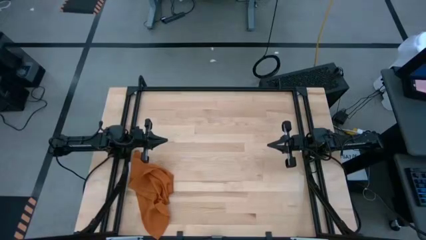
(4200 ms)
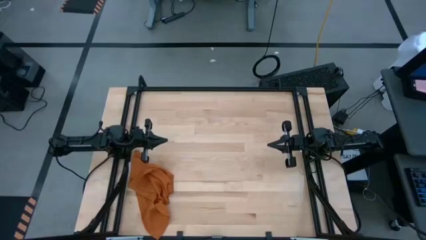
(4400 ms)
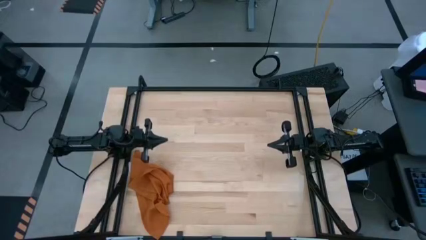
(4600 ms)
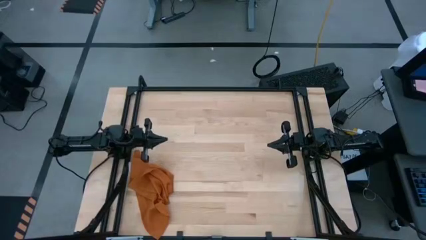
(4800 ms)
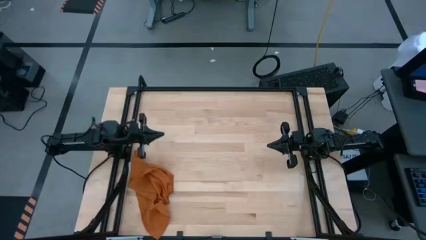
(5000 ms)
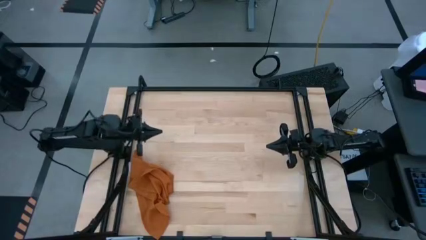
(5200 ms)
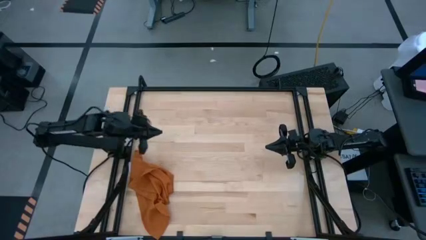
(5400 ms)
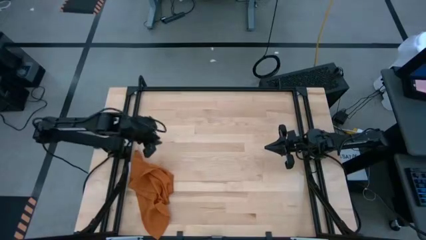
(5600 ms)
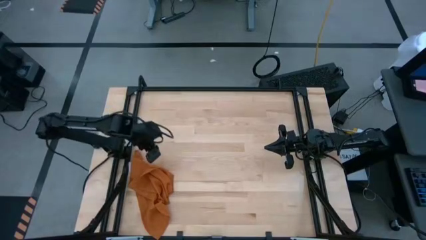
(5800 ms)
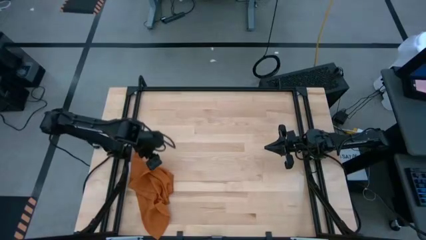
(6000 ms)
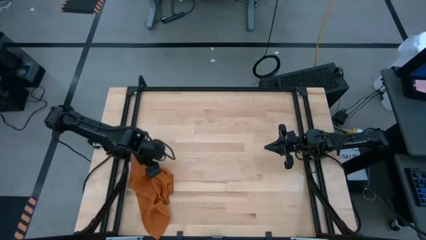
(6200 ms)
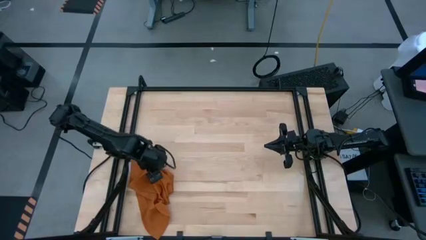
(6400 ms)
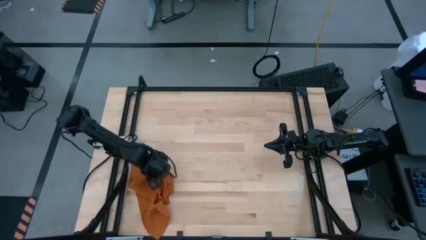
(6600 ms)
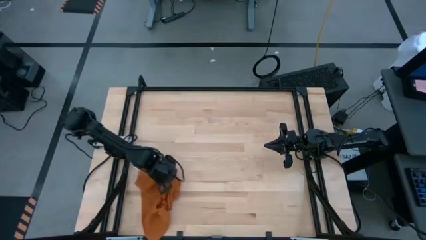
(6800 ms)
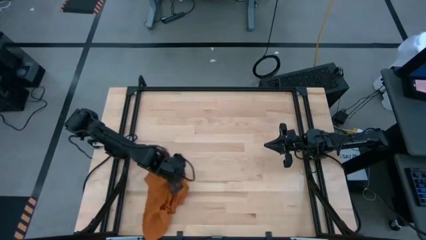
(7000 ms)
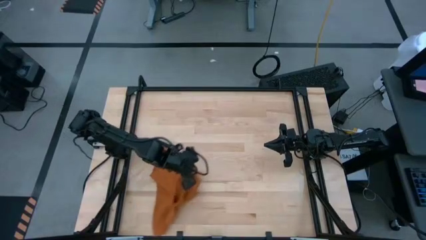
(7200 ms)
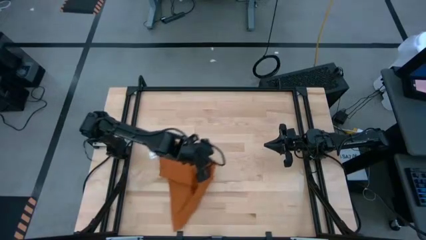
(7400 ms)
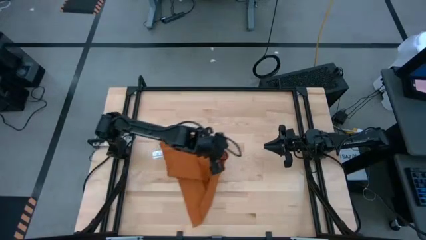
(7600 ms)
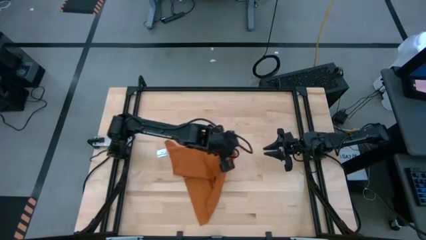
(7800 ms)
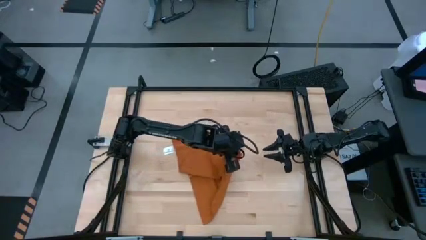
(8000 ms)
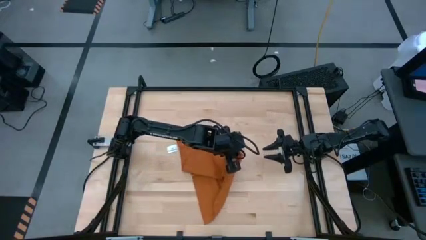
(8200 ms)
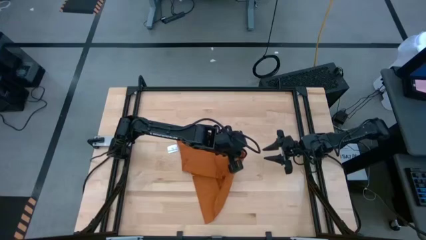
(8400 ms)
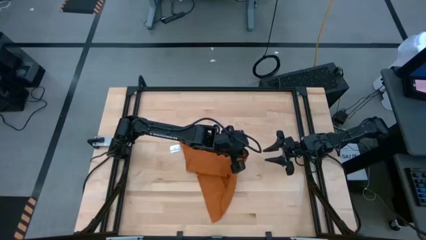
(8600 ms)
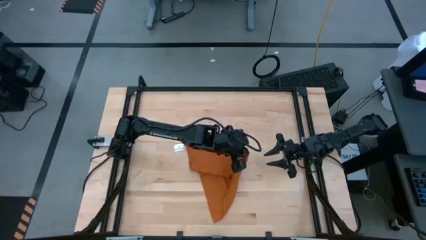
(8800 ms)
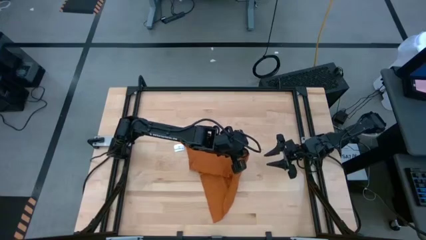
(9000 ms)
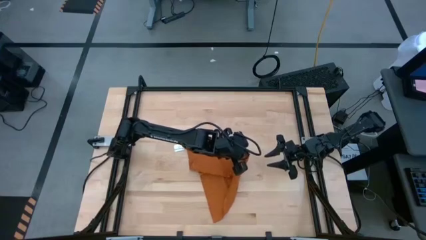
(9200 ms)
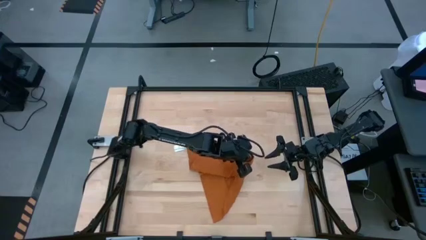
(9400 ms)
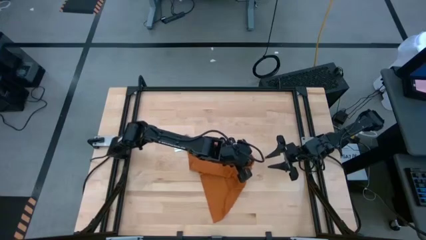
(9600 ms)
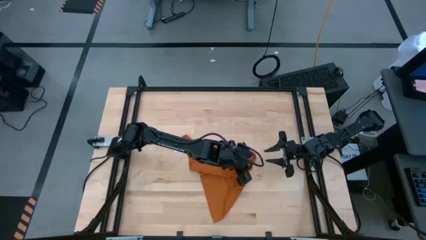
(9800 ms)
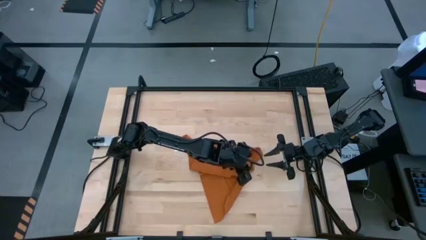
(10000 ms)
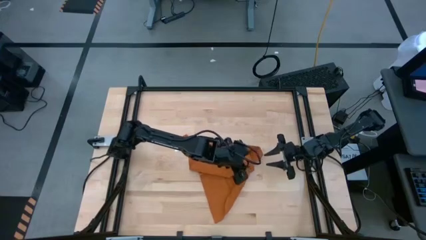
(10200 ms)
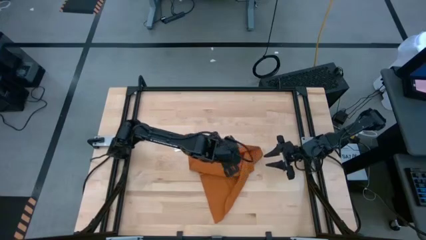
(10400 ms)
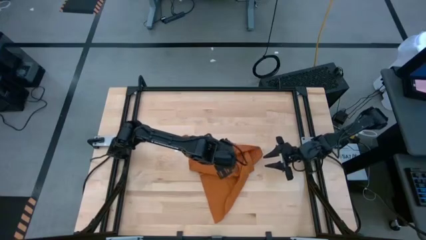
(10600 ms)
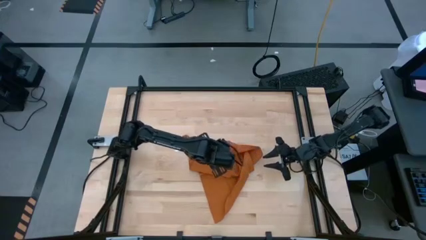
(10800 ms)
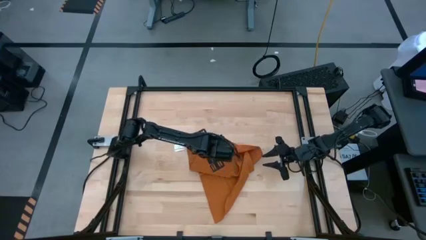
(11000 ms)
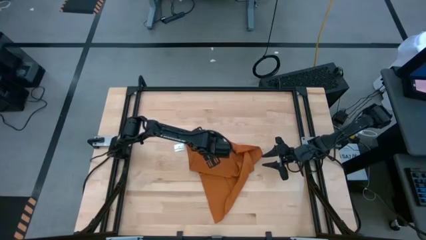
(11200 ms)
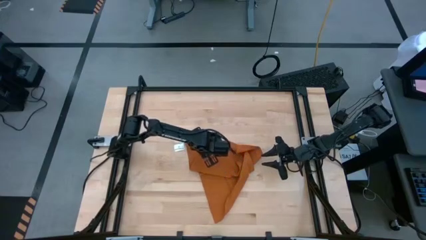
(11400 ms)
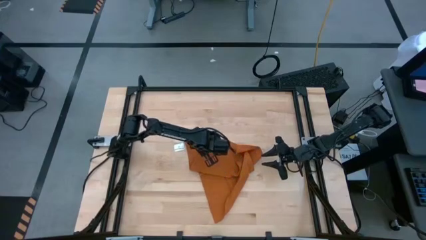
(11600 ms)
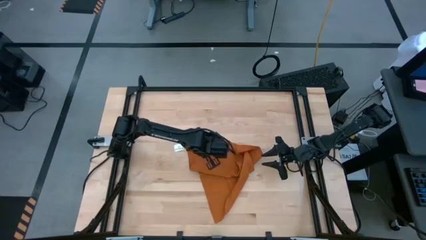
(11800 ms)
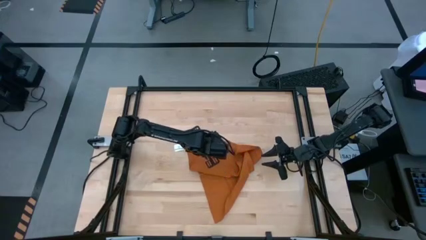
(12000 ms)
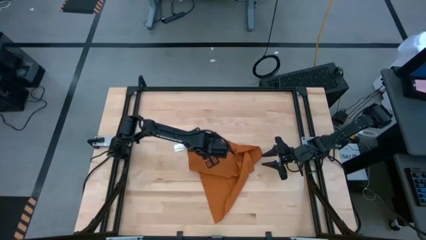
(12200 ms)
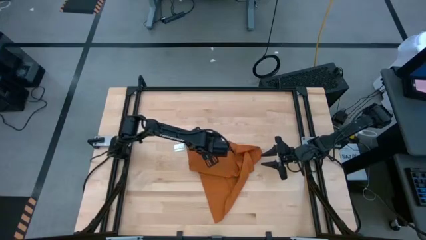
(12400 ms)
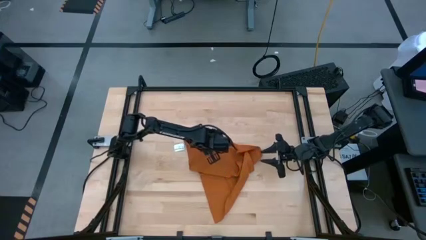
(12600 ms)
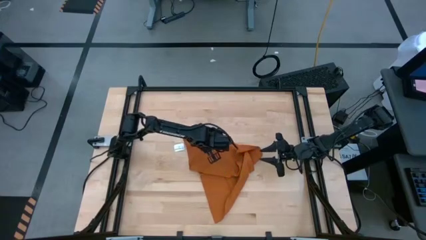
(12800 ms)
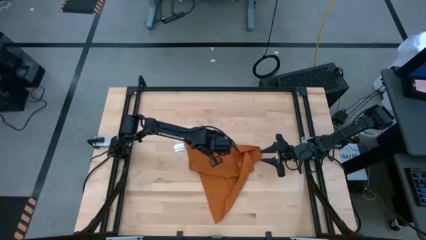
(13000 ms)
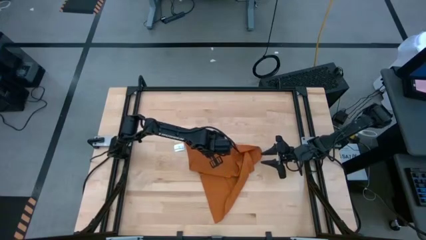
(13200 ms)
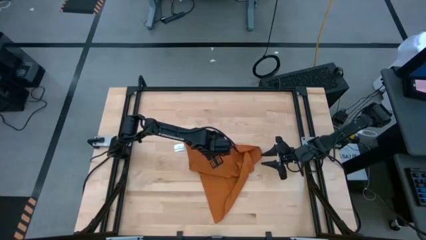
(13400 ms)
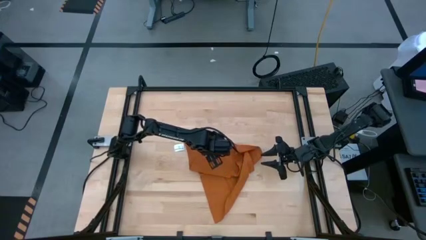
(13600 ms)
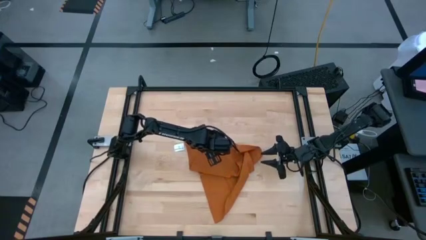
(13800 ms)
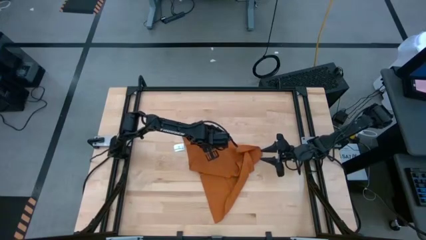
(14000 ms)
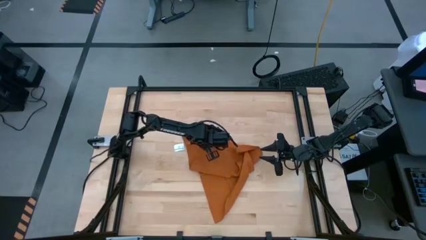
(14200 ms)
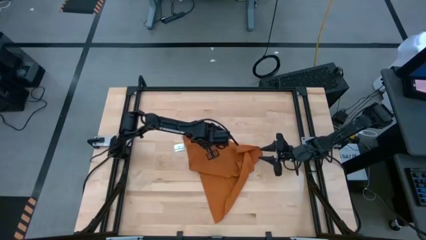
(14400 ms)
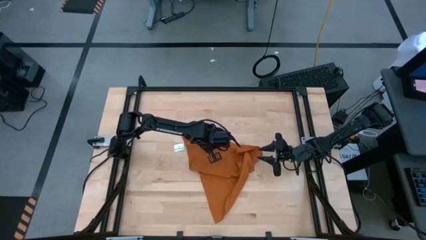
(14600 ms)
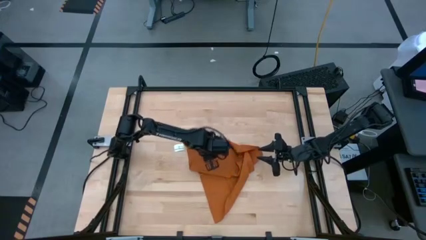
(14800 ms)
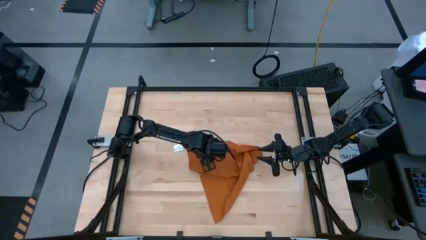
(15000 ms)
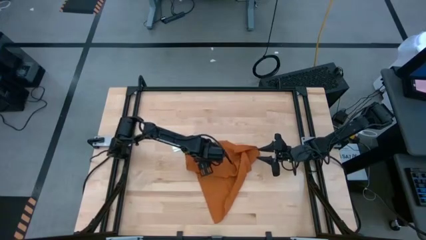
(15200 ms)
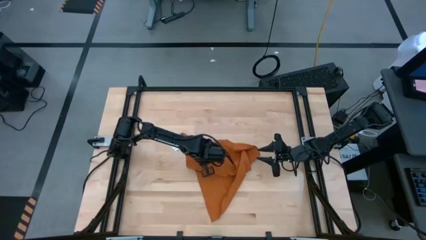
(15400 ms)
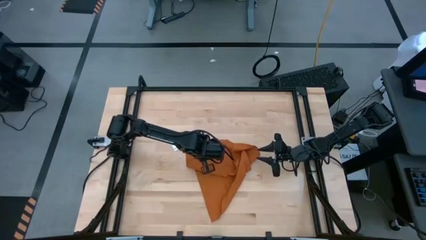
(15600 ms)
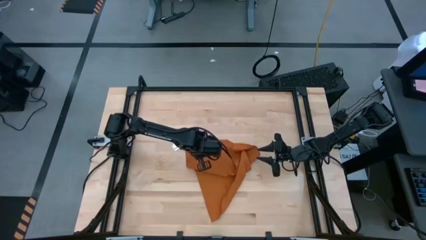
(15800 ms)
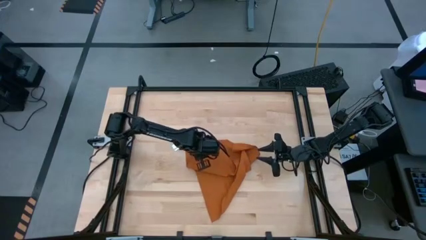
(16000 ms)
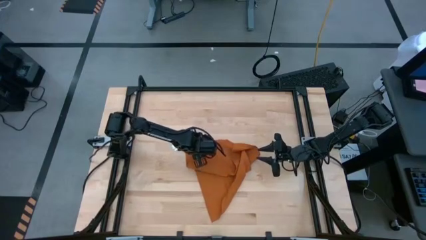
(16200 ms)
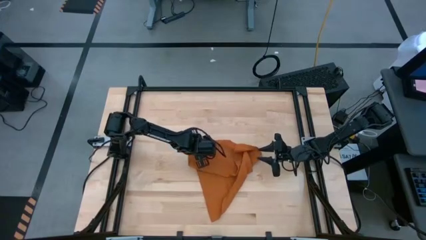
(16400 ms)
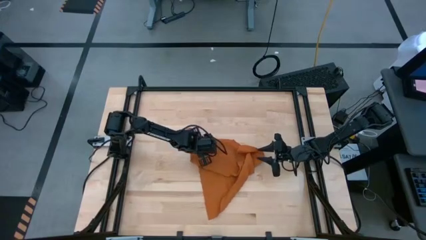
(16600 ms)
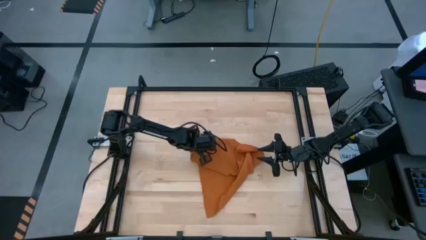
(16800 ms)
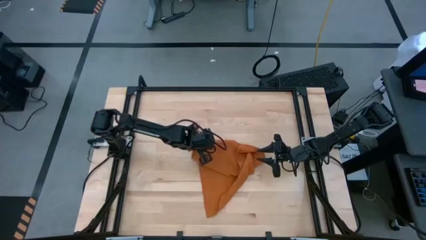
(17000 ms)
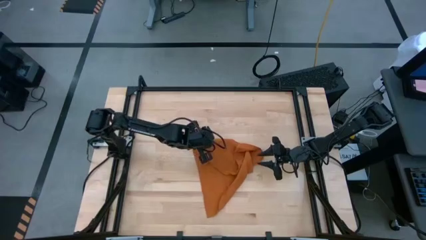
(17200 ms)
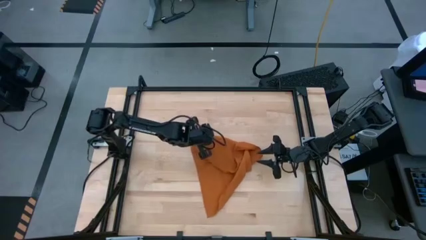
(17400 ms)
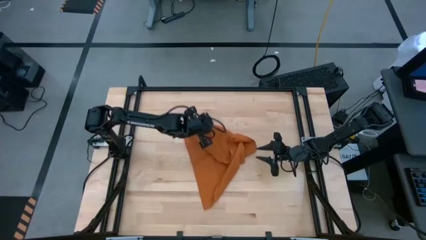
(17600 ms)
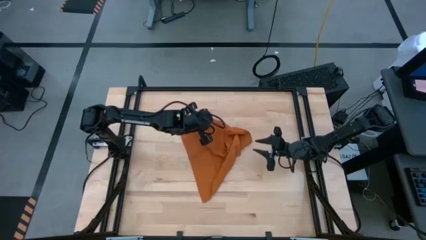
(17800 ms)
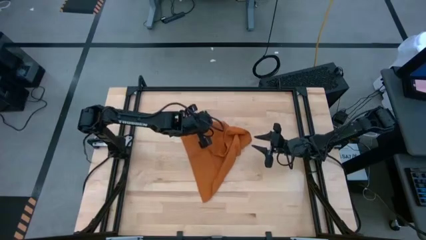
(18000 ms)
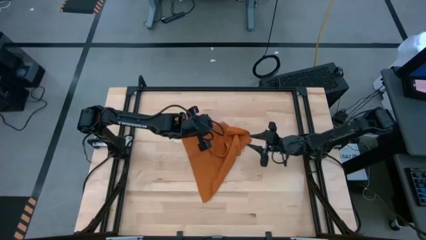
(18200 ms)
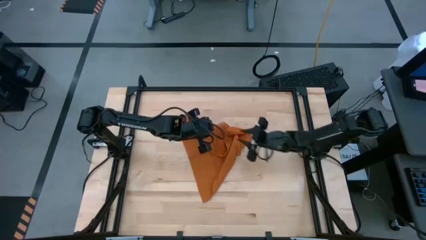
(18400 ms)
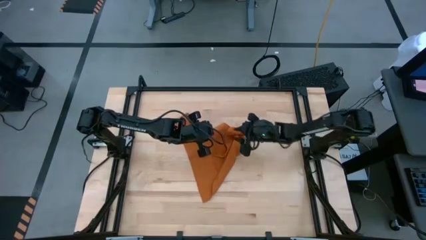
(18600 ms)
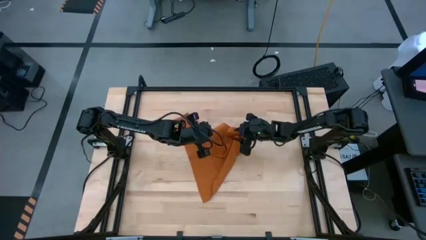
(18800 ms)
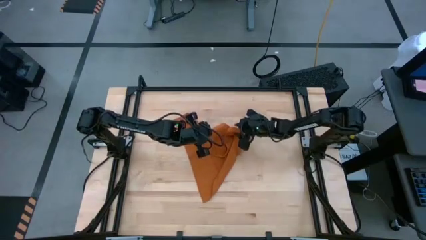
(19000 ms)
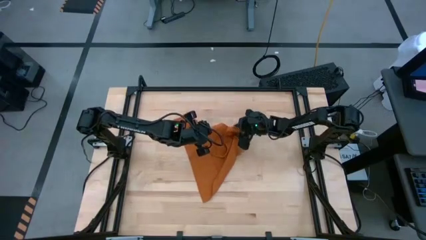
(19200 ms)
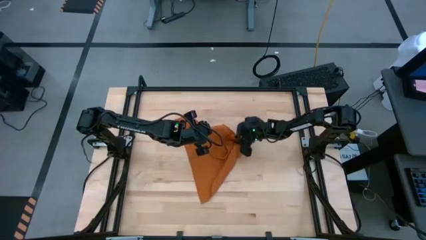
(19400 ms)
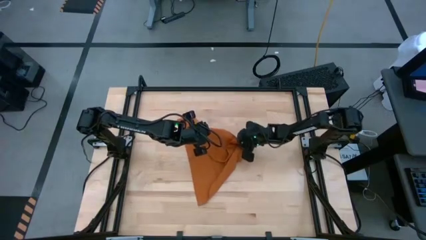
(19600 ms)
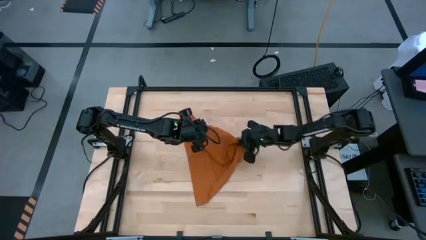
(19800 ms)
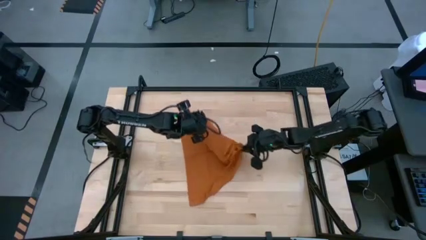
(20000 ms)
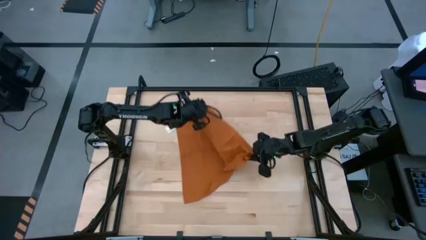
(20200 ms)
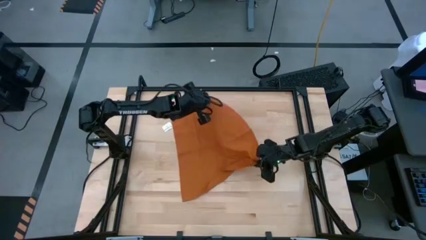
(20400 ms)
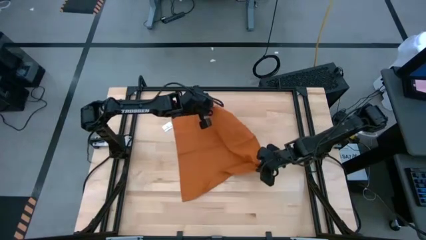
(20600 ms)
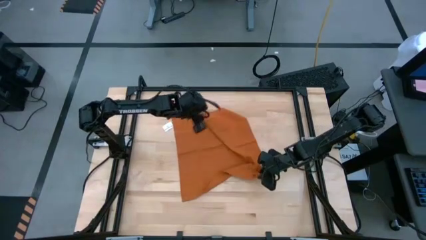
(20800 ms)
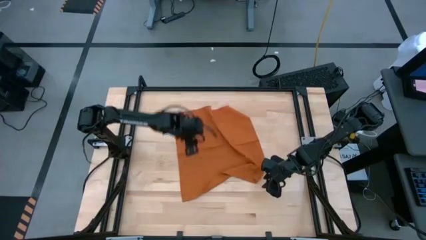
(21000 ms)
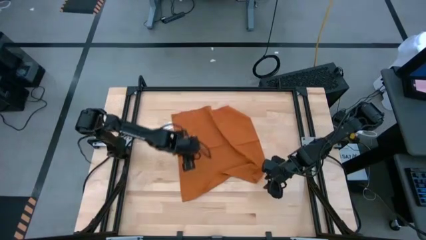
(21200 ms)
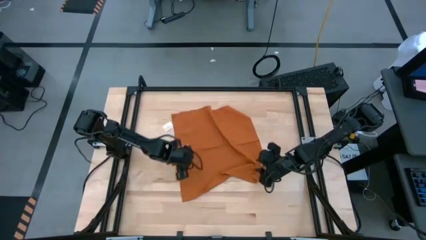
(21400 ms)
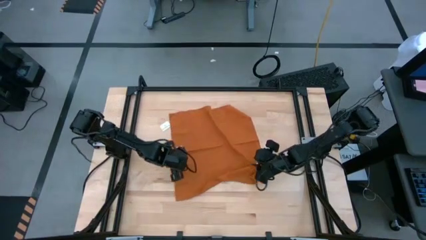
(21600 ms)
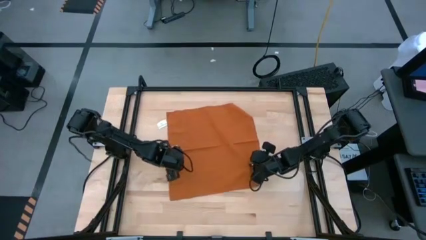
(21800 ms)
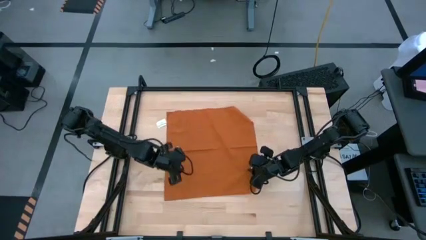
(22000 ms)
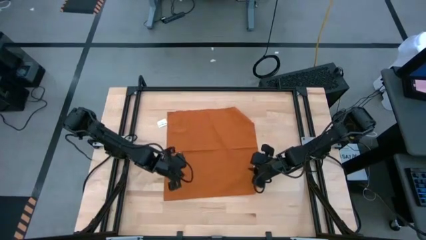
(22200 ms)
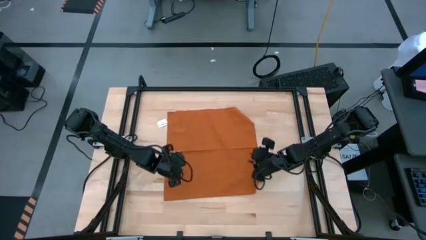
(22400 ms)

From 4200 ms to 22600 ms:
Task: Roll towel
Roll the brown towel
